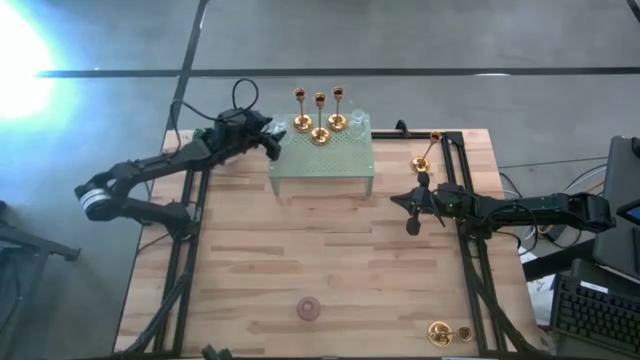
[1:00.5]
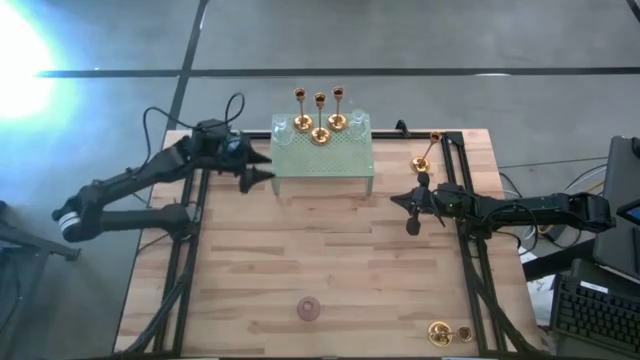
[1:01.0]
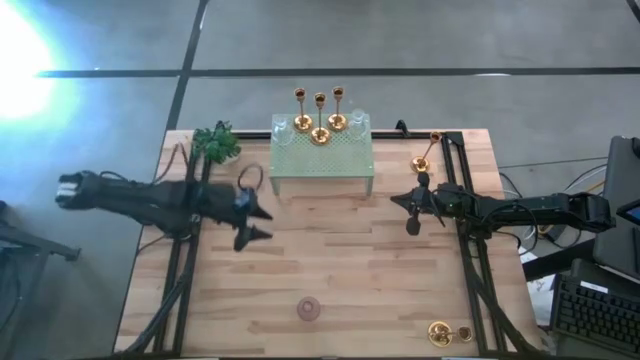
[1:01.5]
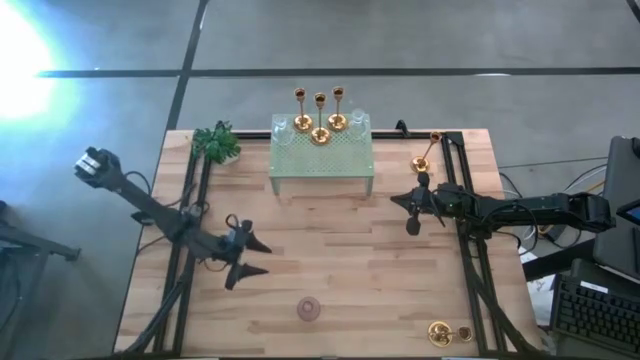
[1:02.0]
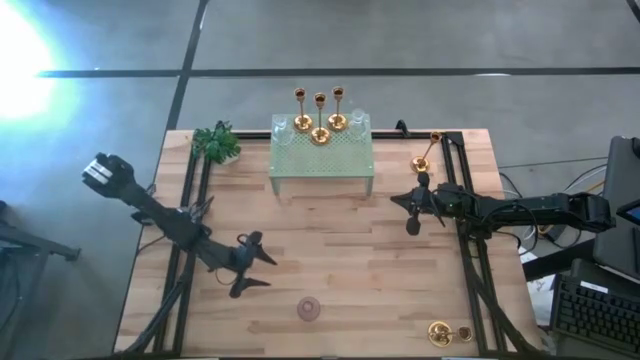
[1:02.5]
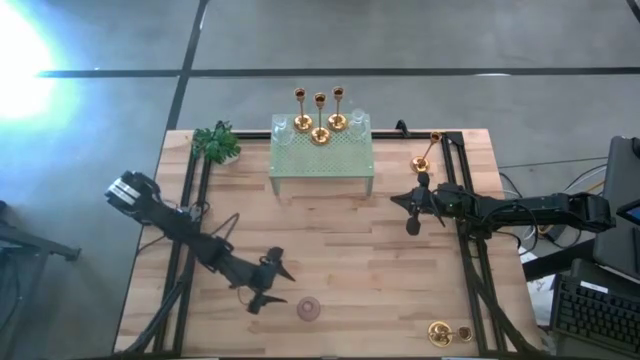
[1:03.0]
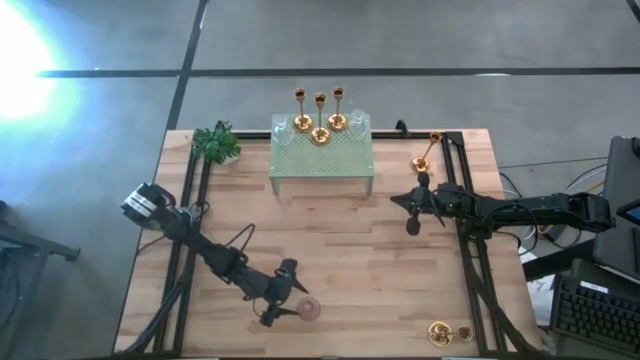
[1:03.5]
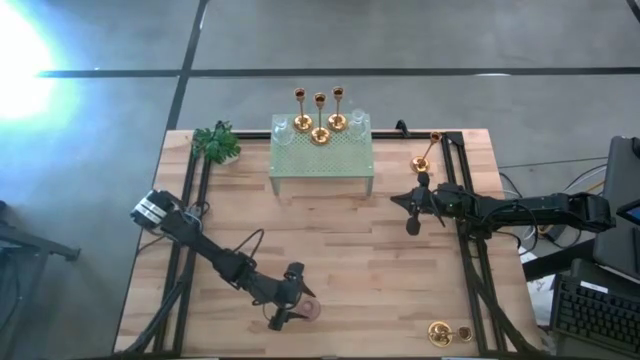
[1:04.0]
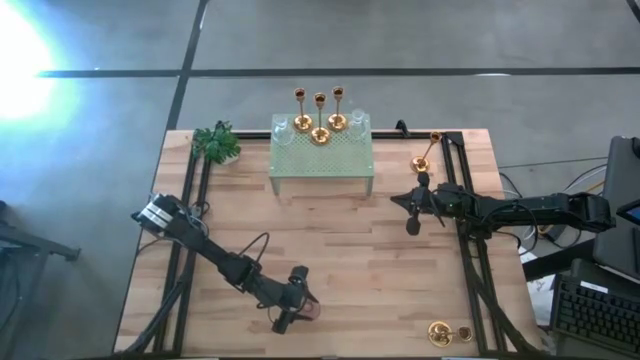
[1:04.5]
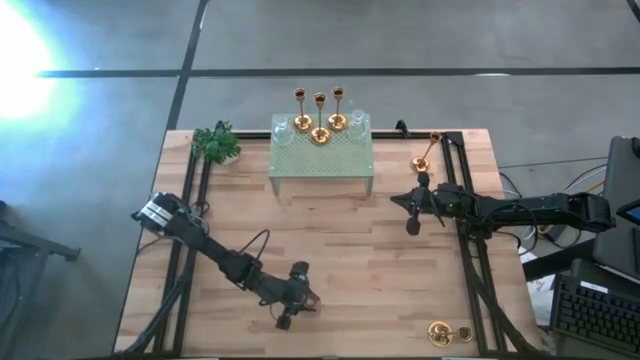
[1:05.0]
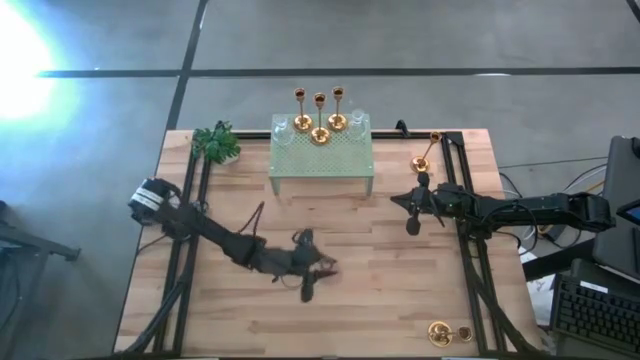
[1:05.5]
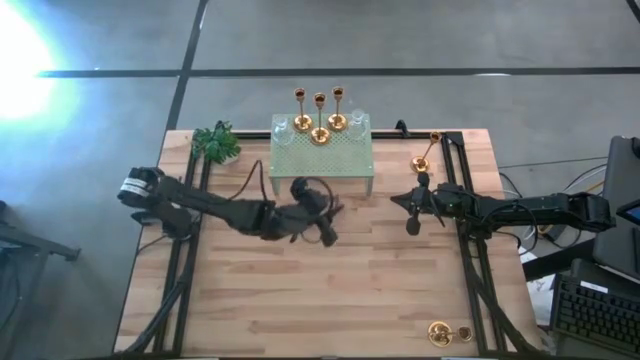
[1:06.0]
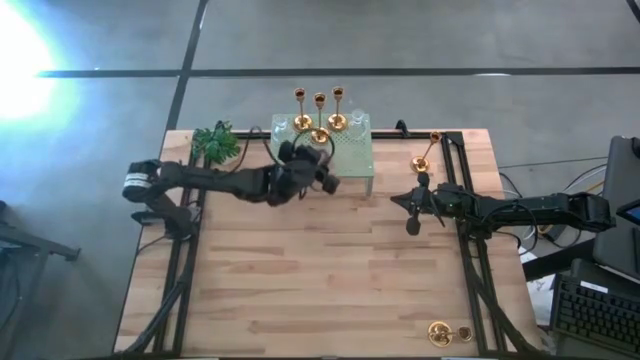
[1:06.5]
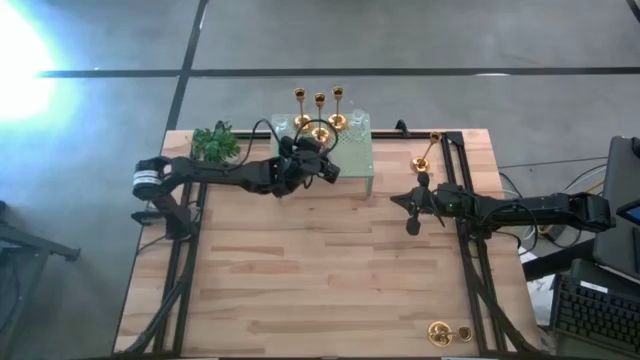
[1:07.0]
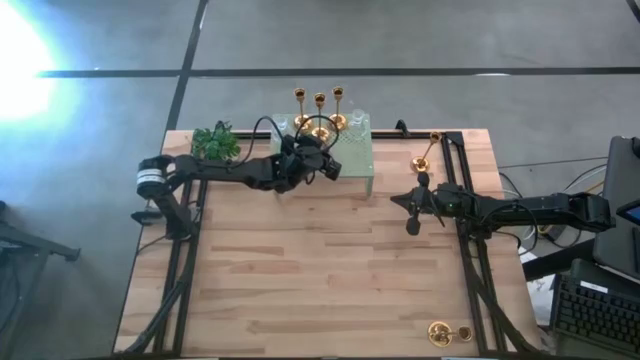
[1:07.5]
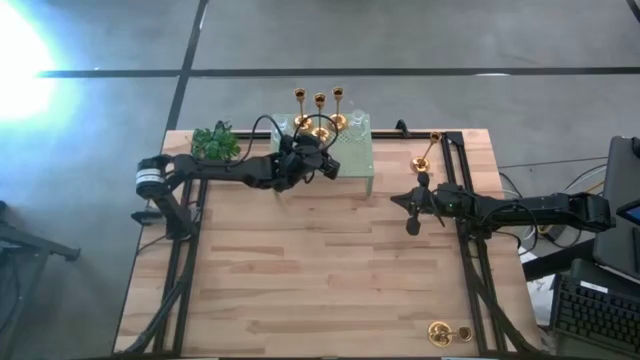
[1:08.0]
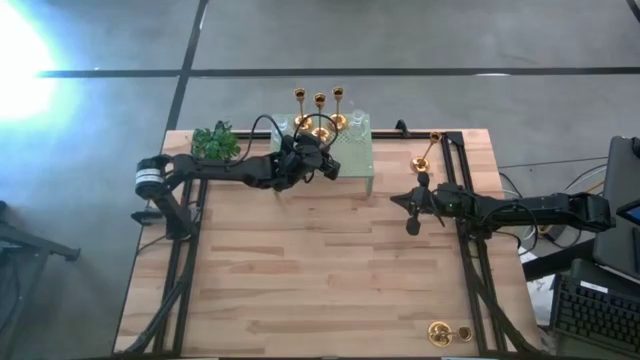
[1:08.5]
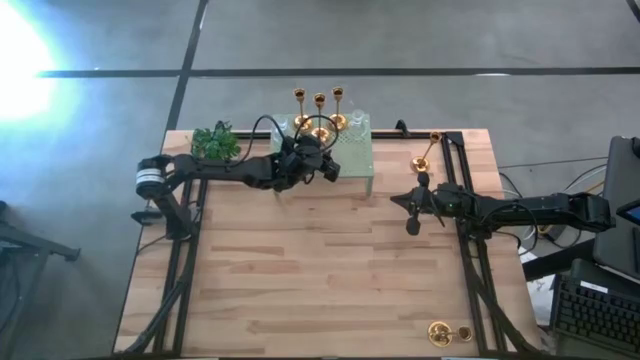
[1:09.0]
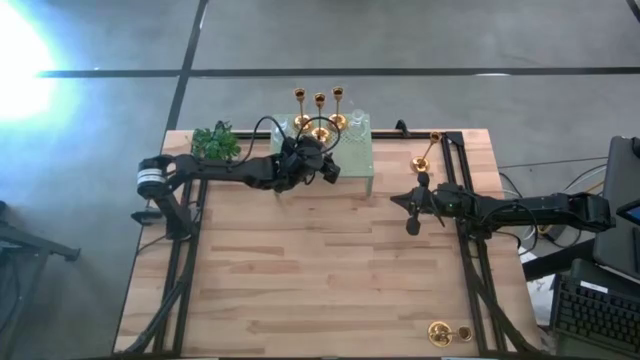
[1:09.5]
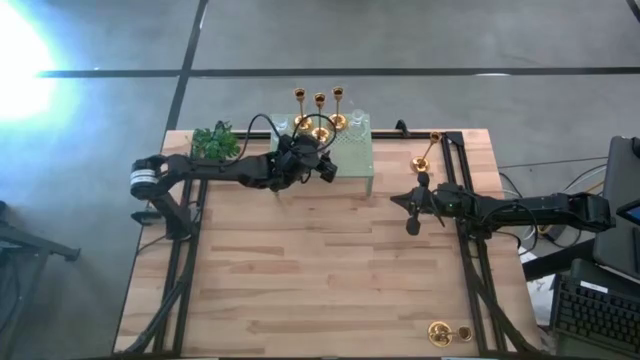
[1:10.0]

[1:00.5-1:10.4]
Task: Pick & Place candle stick holders
Put the pink glass candle holder on the shelf

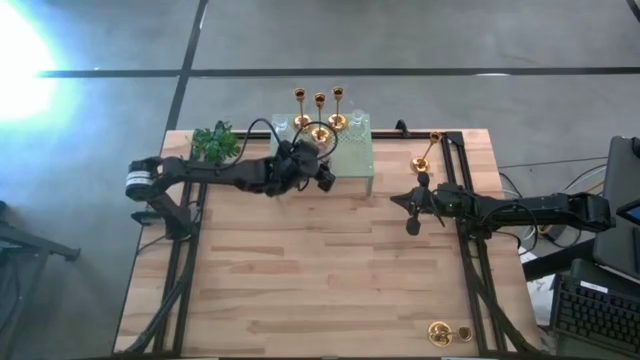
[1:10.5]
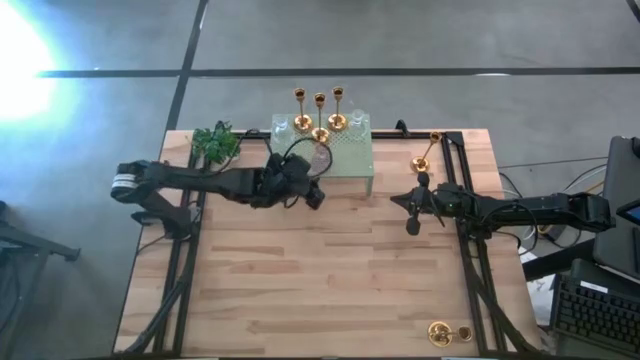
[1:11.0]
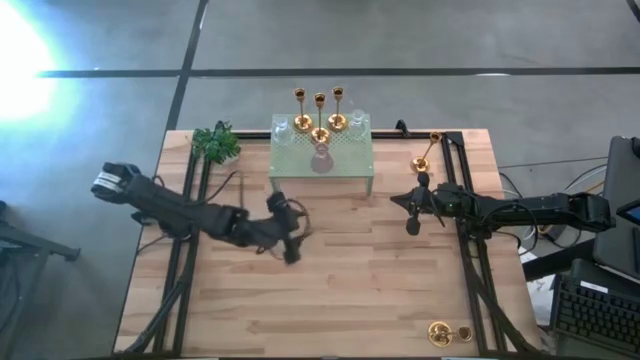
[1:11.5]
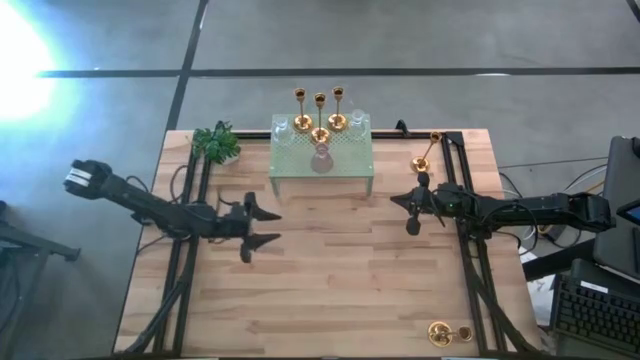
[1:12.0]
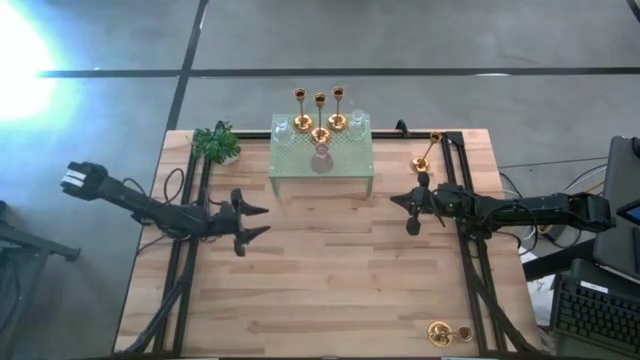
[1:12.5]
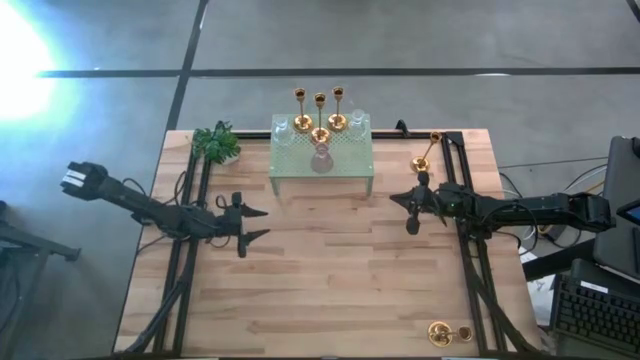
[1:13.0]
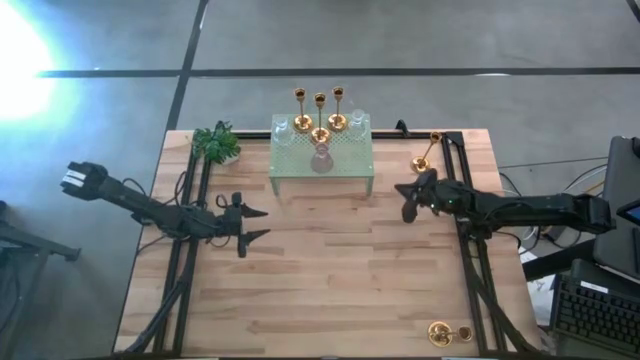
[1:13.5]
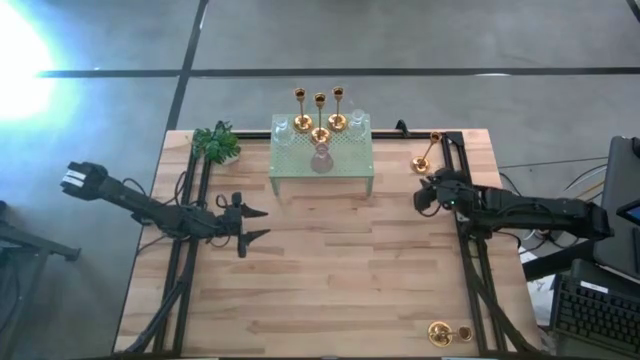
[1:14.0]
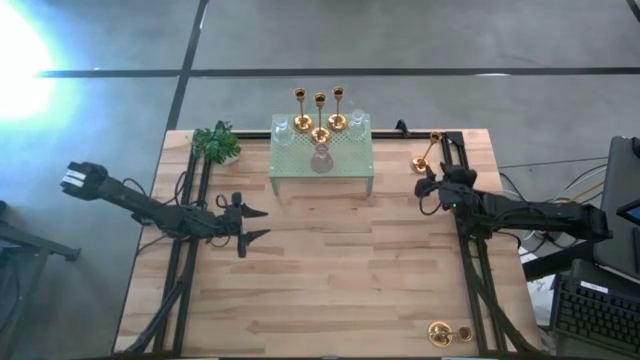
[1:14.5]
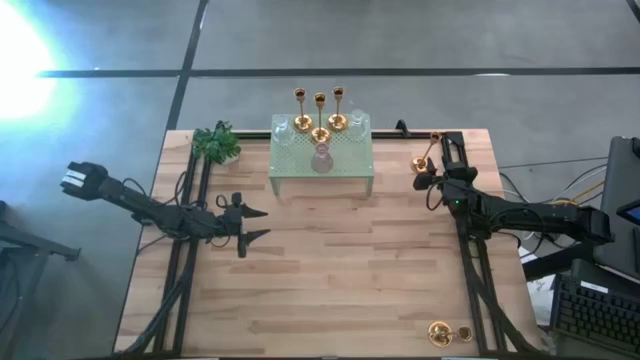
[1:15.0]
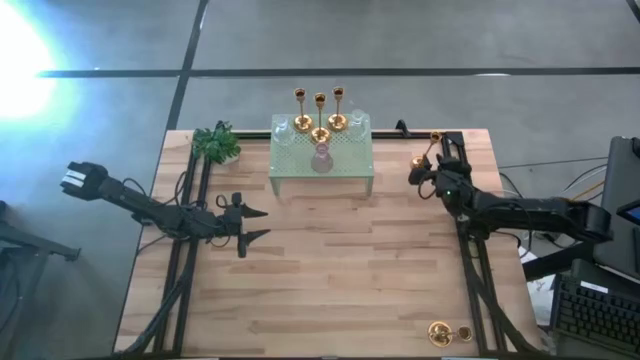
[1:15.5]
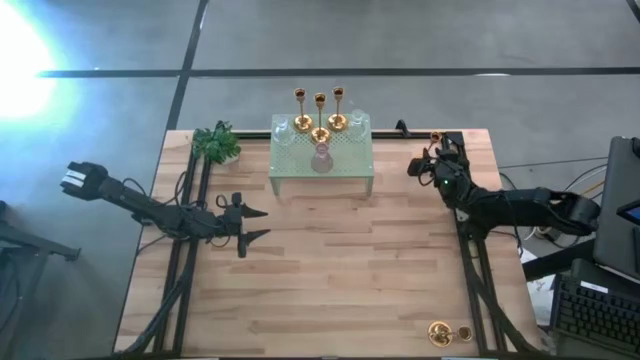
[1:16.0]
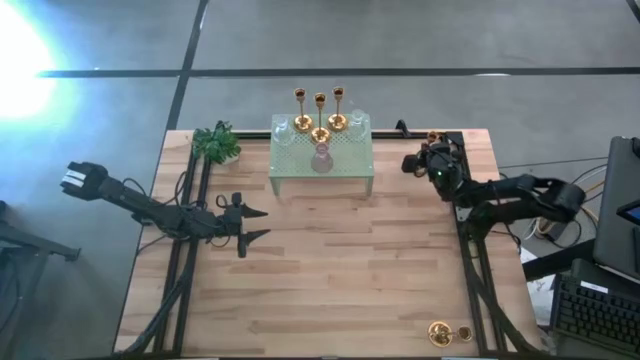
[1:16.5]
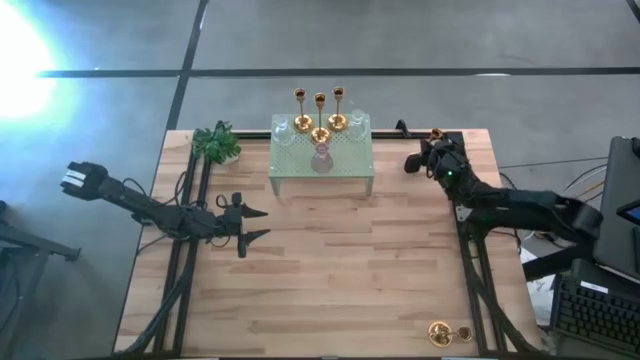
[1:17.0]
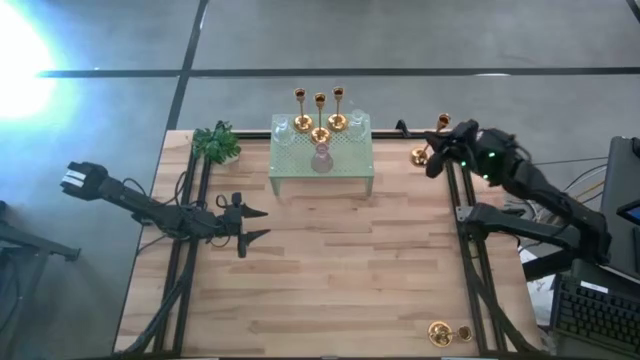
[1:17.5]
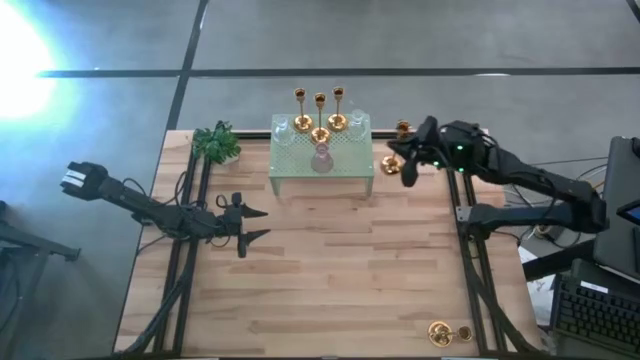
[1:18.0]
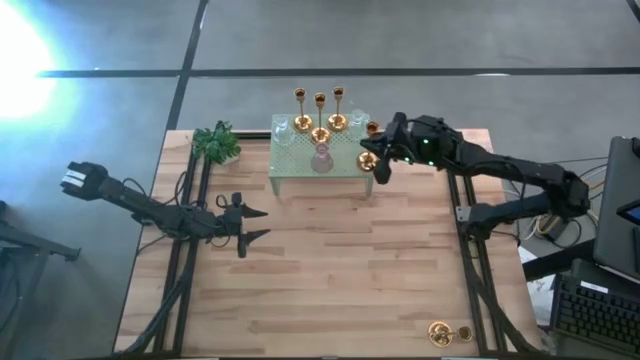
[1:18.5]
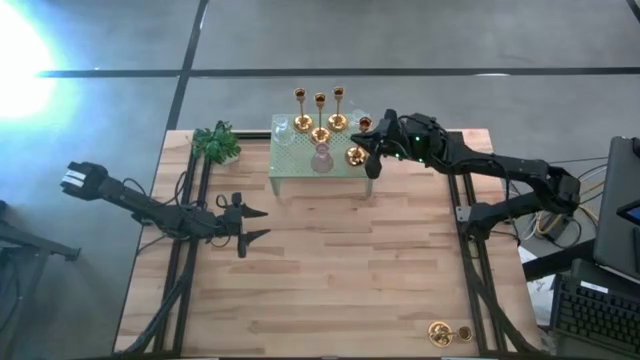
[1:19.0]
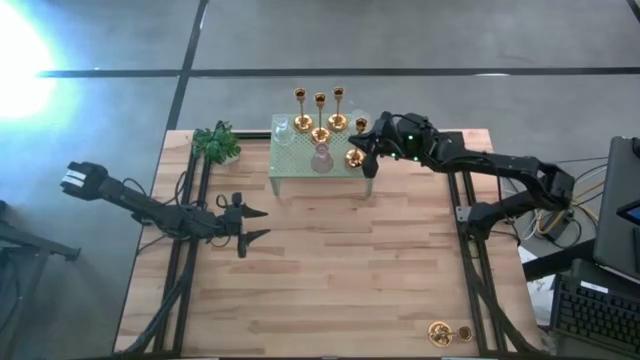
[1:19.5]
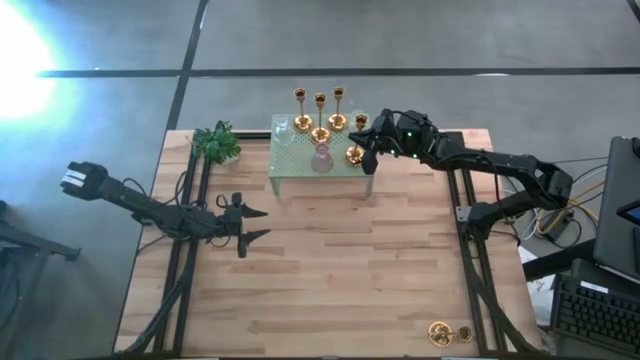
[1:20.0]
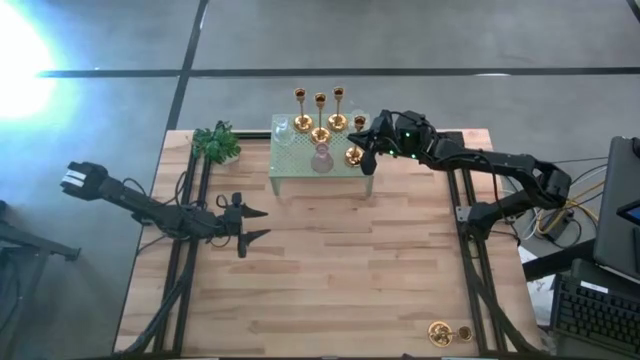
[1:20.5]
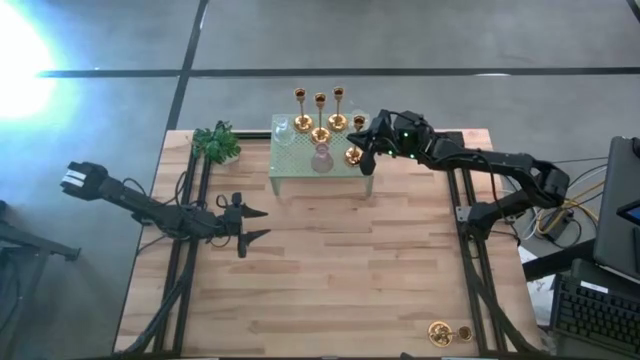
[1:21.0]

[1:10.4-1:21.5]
Put the gold candle holder on the shelf
